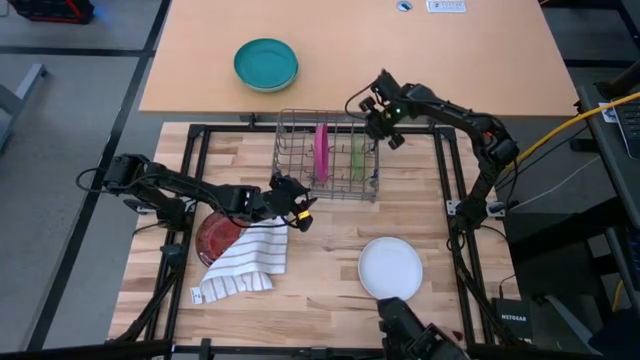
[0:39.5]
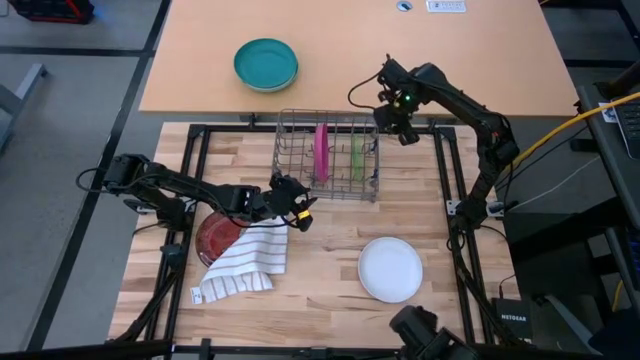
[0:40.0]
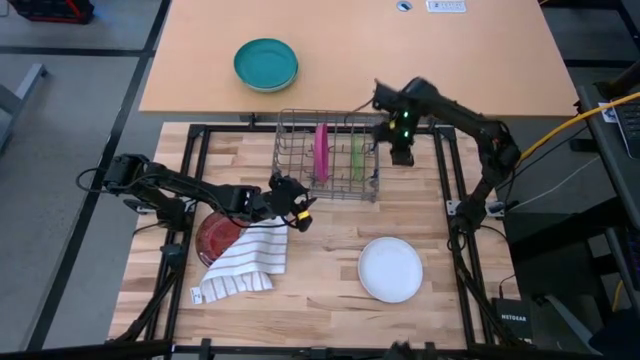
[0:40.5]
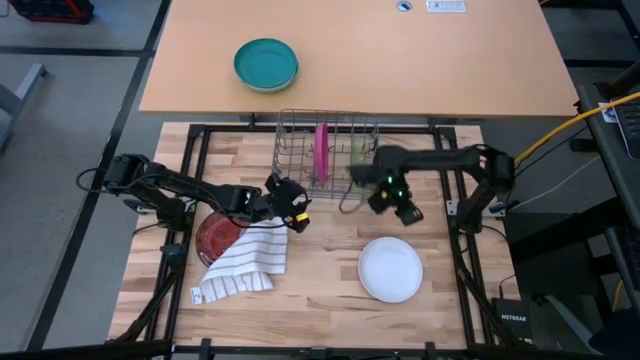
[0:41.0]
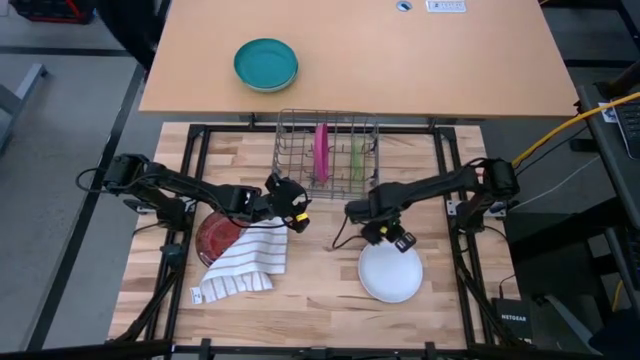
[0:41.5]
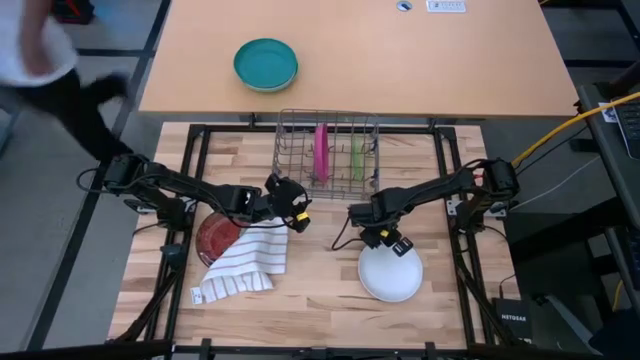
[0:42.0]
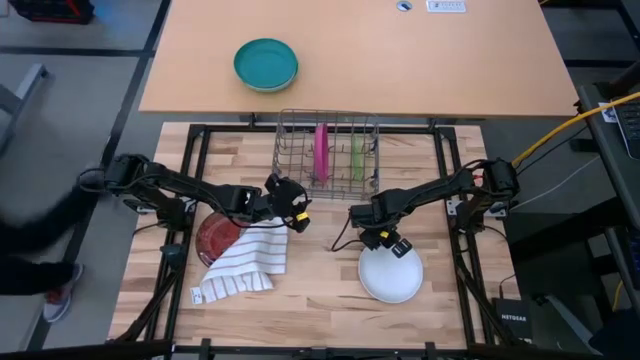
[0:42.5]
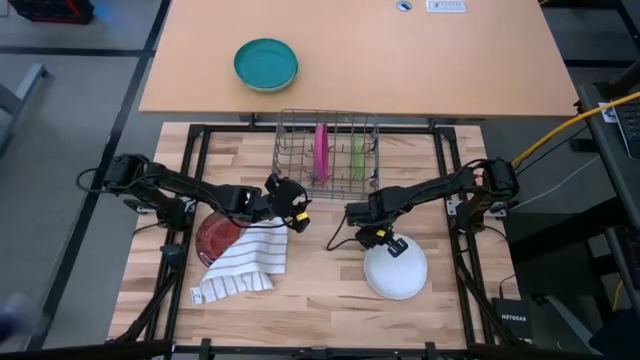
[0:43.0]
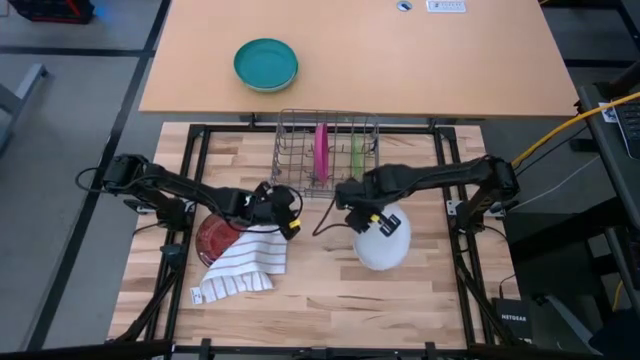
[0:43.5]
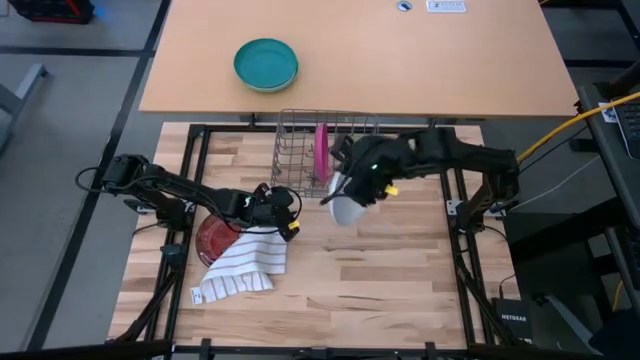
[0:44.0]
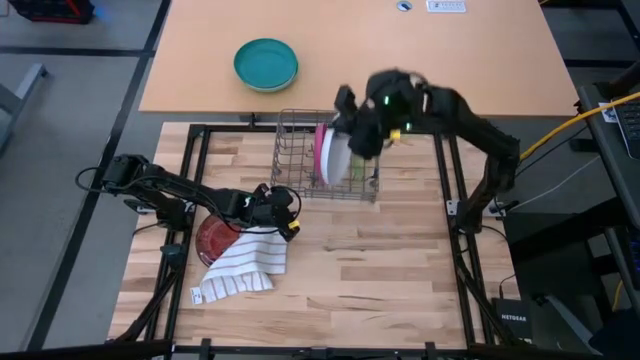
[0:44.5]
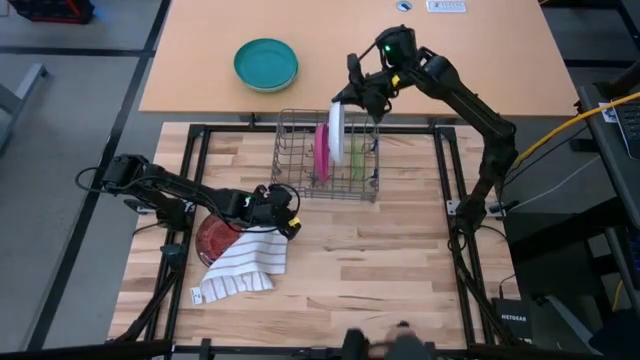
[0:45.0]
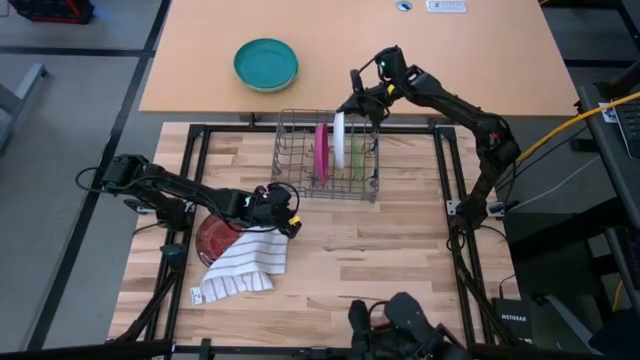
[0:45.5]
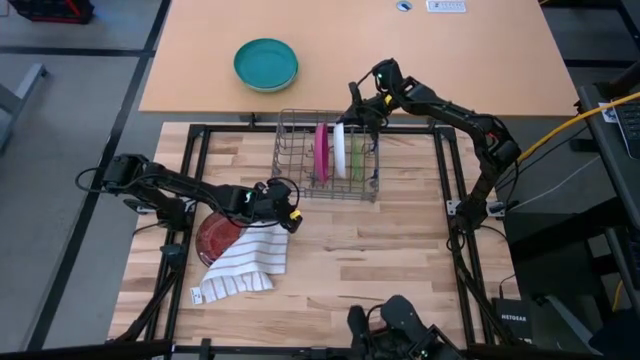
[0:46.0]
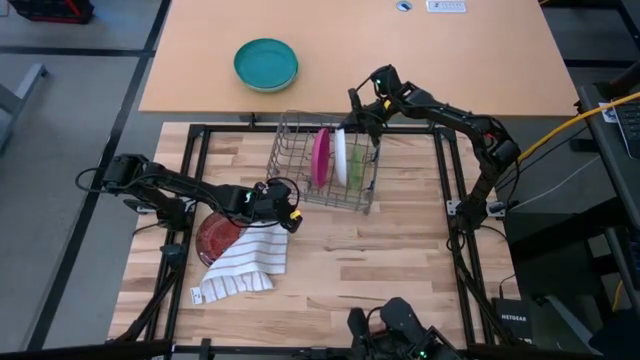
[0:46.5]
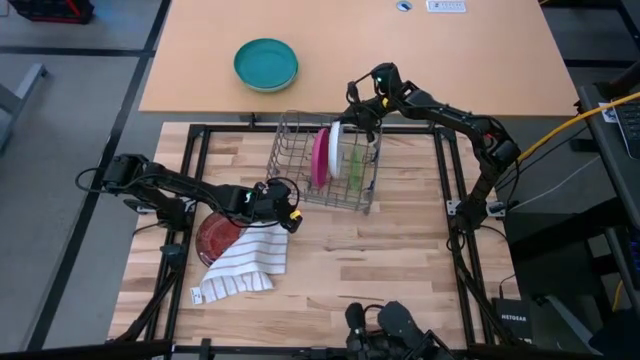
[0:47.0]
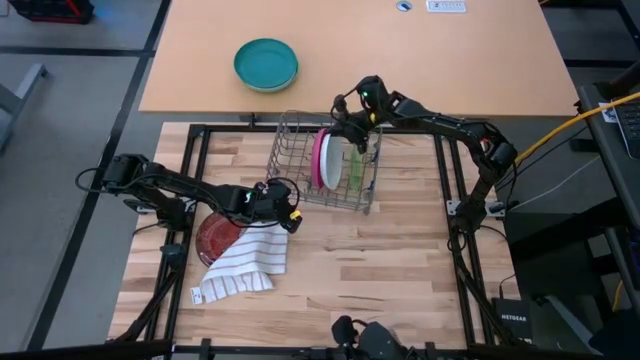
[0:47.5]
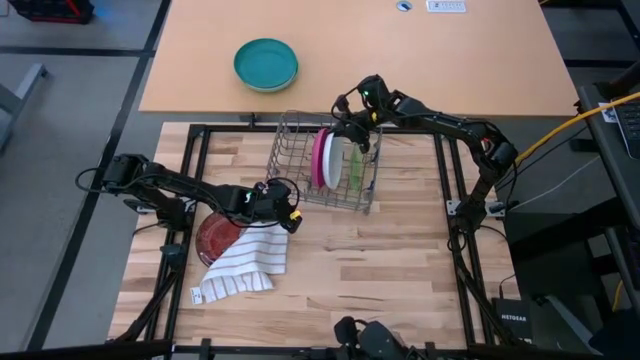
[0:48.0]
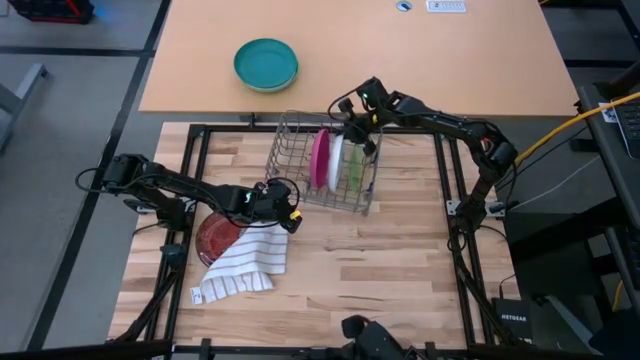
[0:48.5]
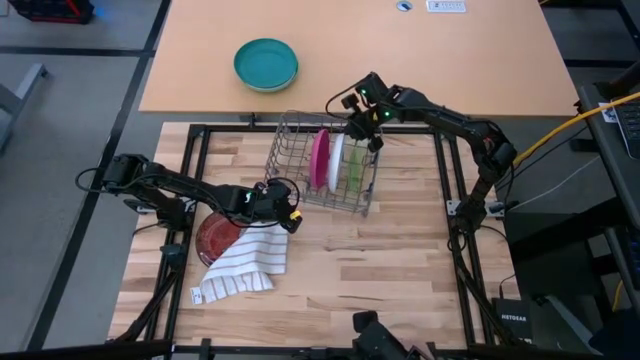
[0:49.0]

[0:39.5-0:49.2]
Task: Sort dishes
Put the white plate in the dish rack

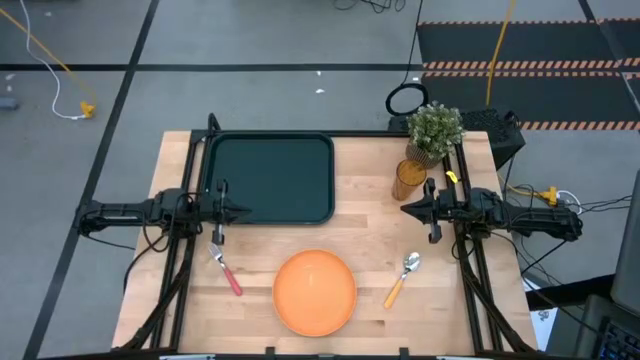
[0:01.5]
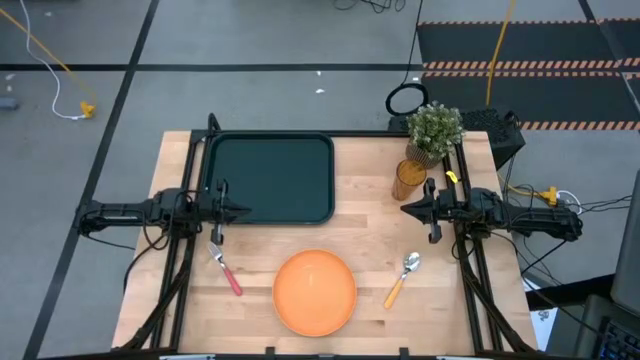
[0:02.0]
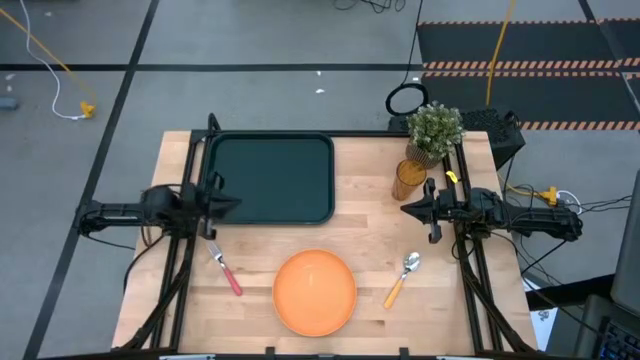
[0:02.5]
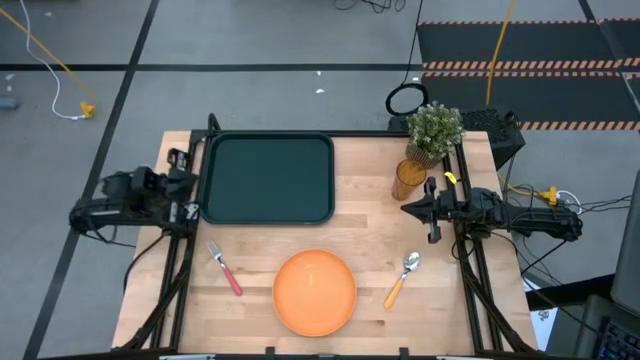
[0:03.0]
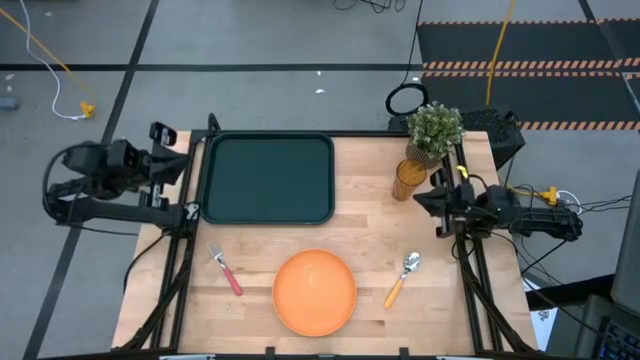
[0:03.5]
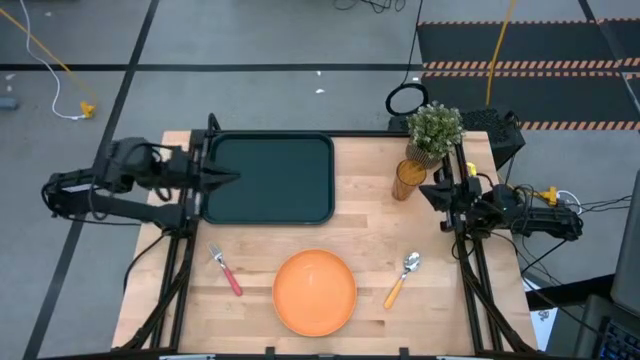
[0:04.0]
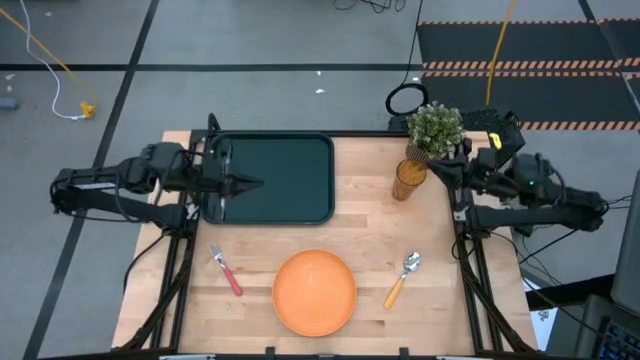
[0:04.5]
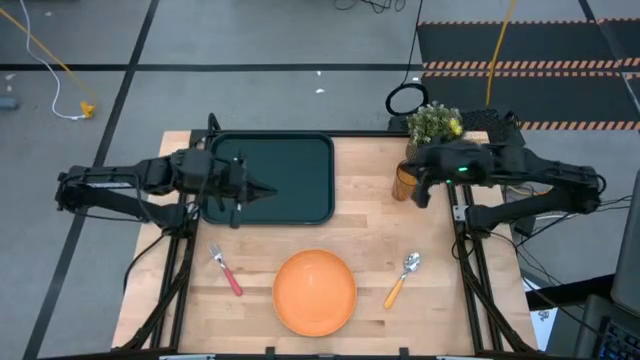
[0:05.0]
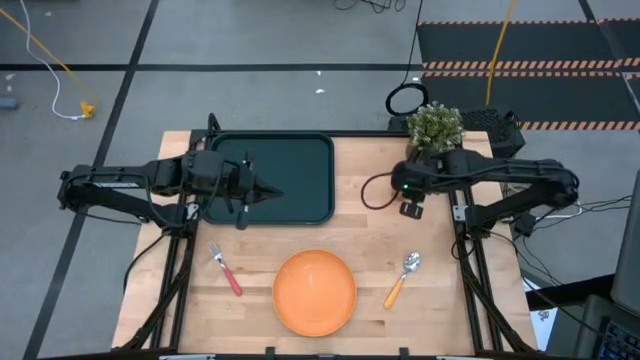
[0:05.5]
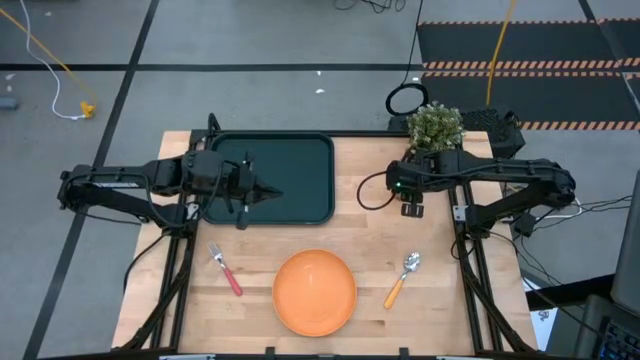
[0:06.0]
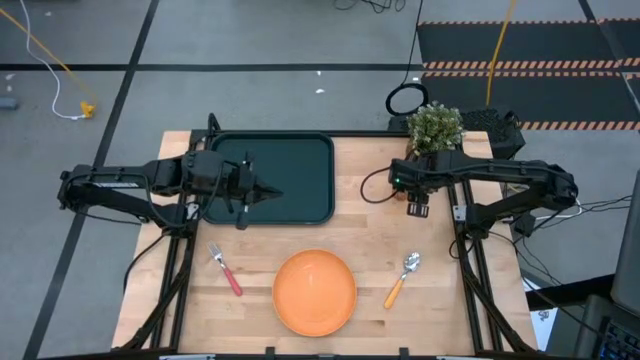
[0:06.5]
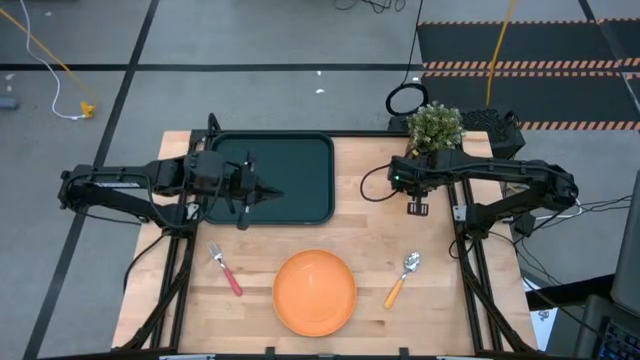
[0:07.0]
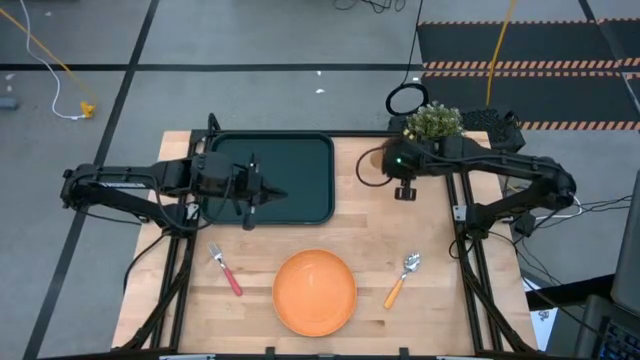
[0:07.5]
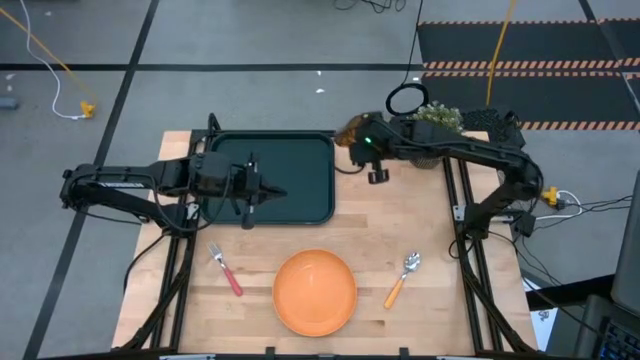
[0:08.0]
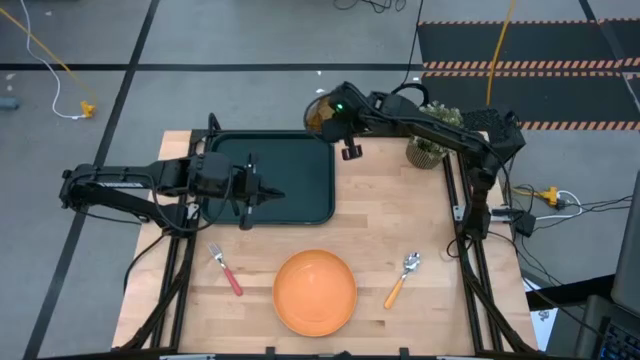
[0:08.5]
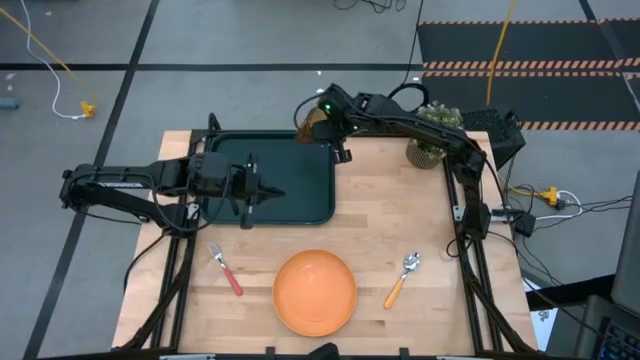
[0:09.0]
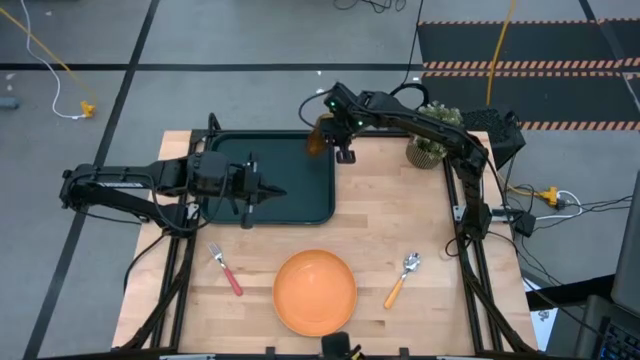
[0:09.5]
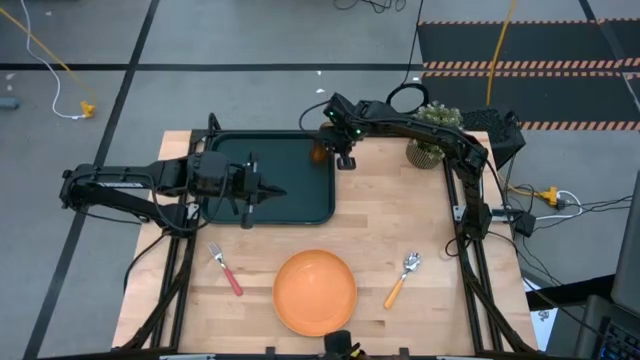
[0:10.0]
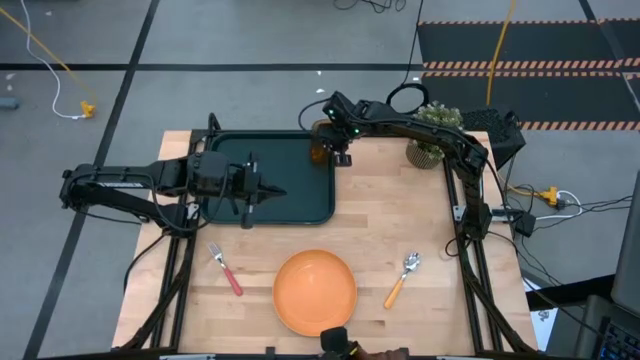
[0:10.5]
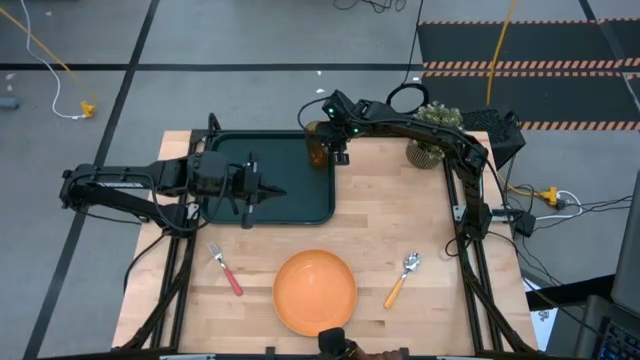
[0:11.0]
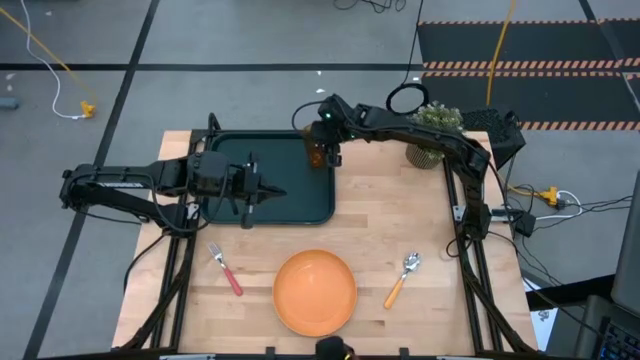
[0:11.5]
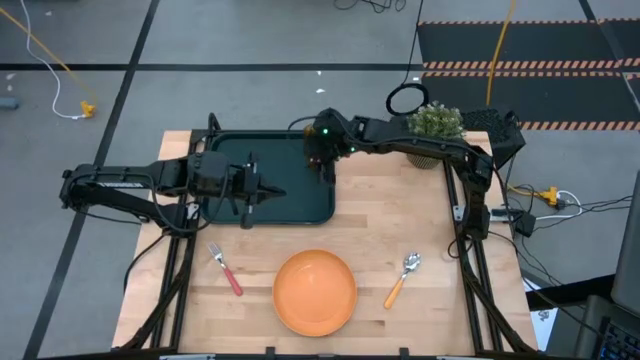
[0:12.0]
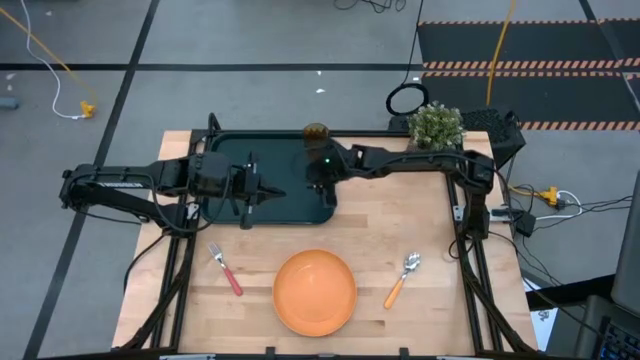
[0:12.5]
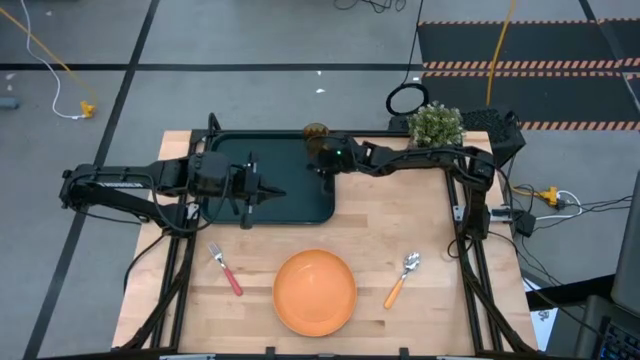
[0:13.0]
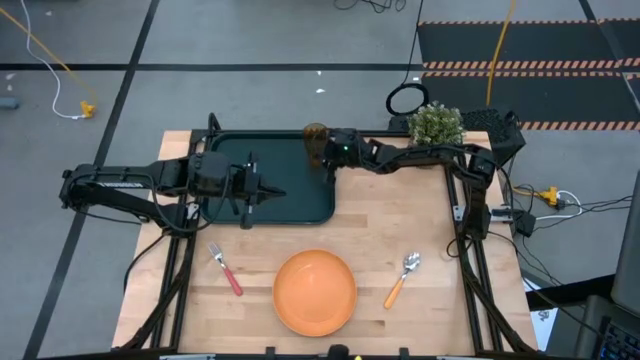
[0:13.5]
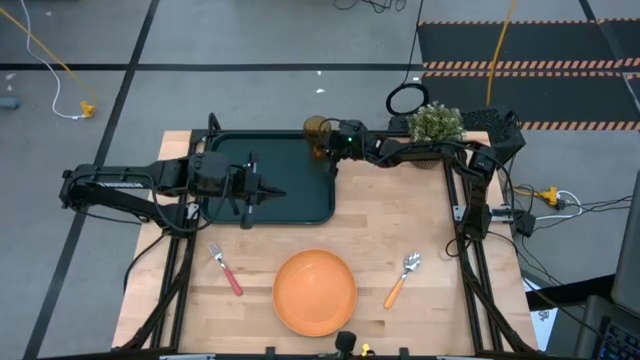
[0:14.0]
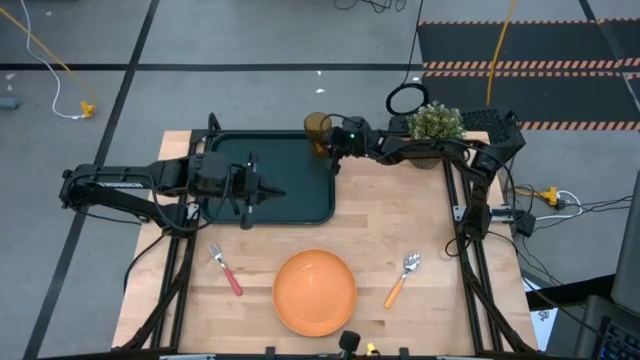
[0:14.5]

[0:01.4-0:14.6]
Task: Pick and place plate/cup/fork/spoon on tray
Put the orange cup on the black tray
